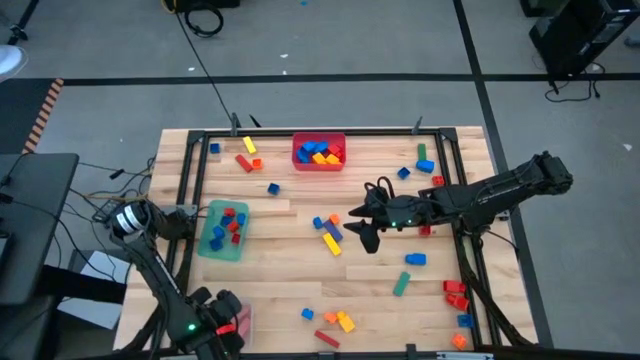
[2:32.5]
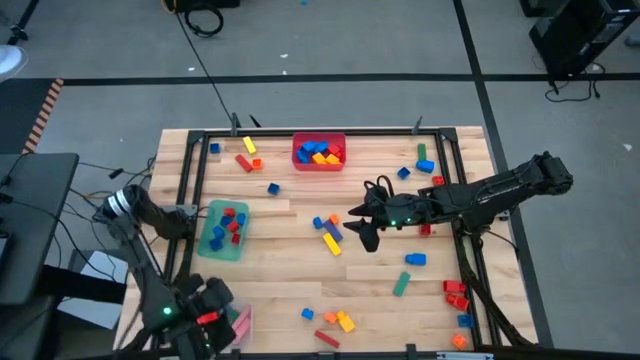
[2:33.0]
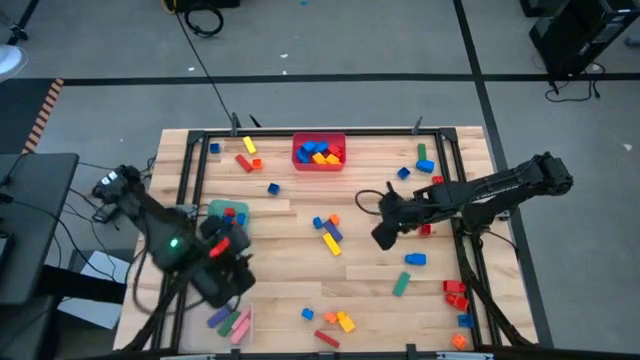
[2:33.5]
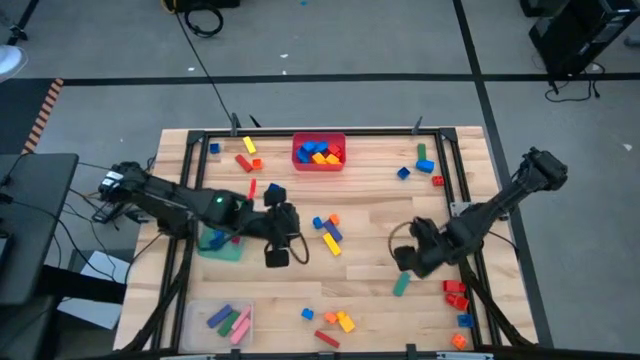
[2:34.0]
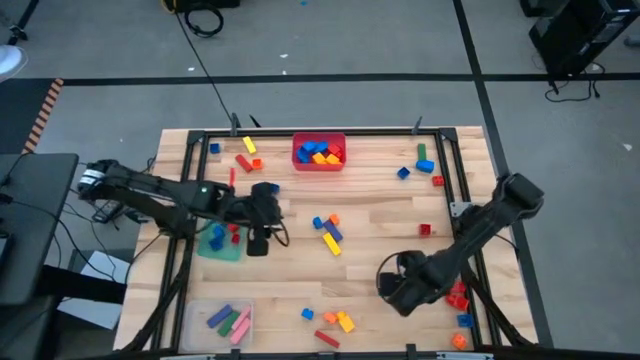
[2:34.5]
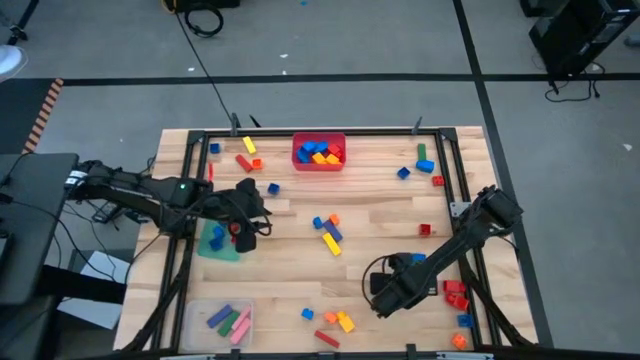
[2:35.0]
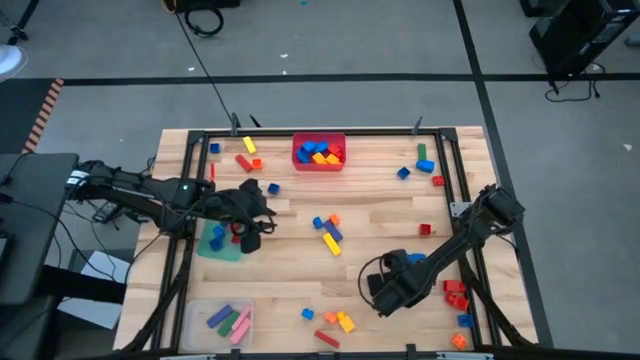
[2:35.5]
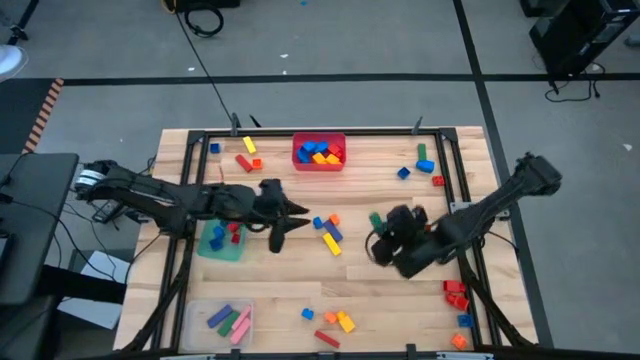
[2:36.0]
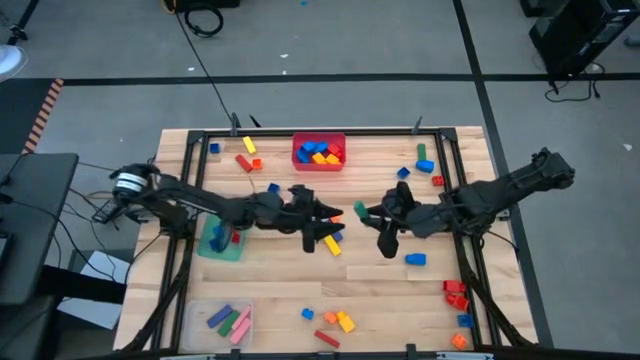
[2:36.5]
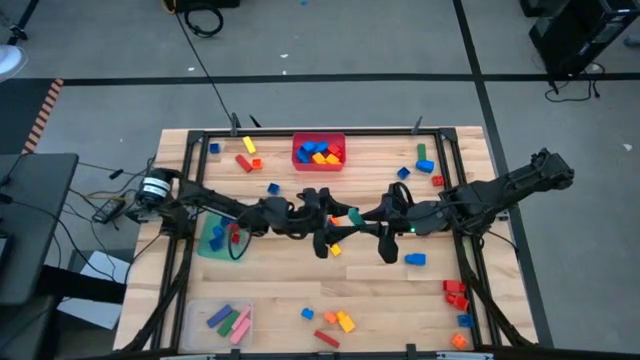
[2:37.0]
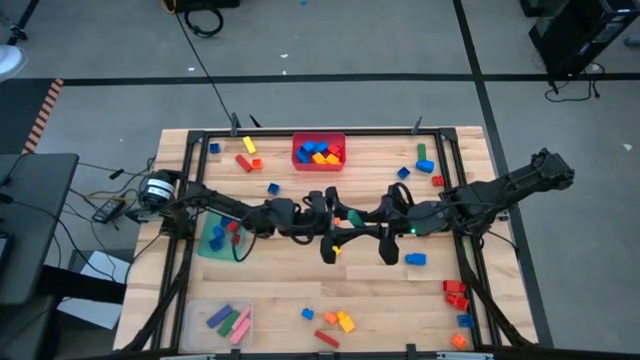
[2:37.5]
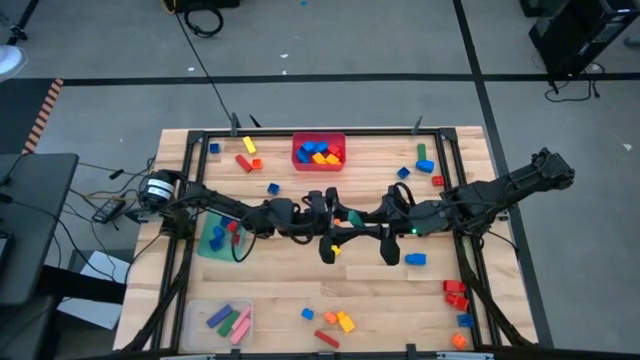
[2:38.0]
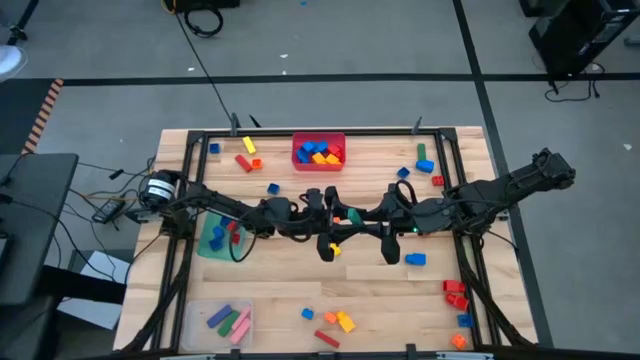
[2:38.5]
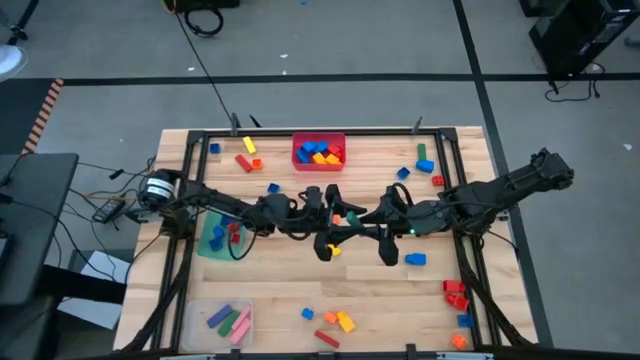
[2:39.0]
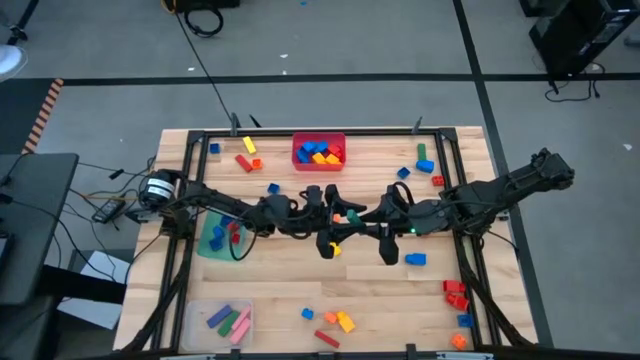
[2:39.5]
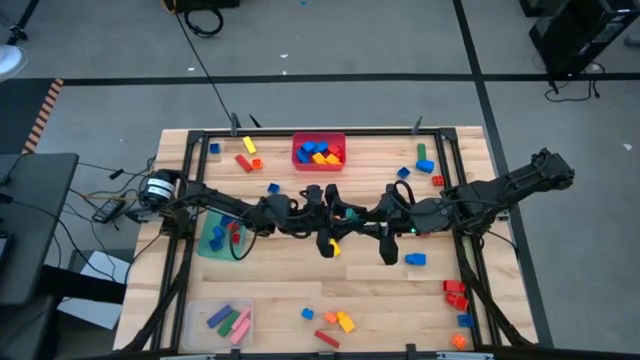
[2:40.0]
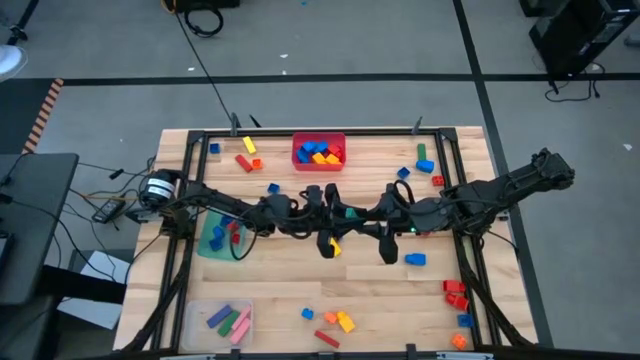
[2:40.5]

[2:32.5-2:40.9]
Task: Sort blocks by size
Put the teal rectangle block into the transparent bin

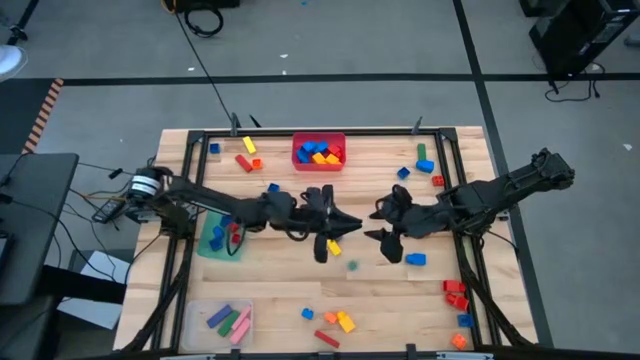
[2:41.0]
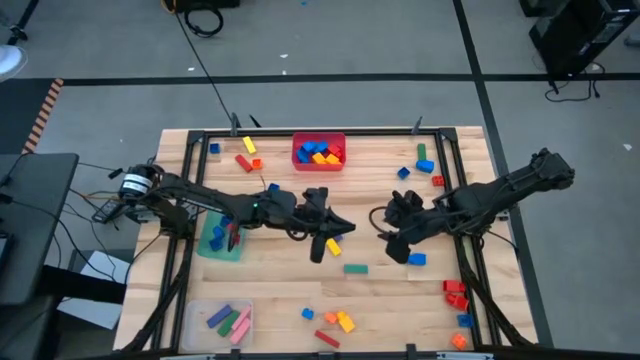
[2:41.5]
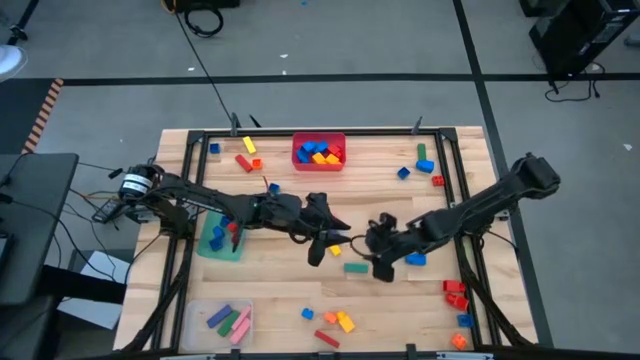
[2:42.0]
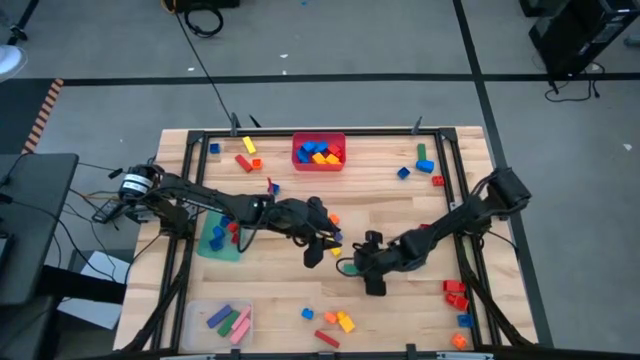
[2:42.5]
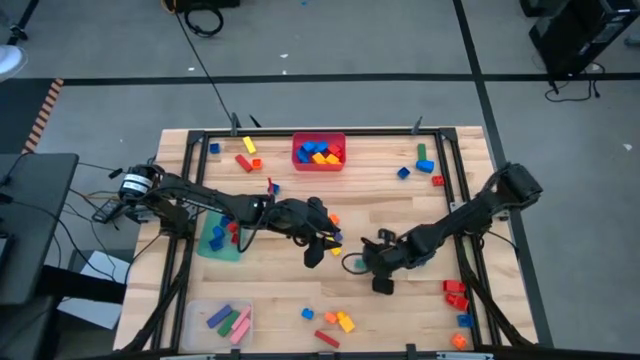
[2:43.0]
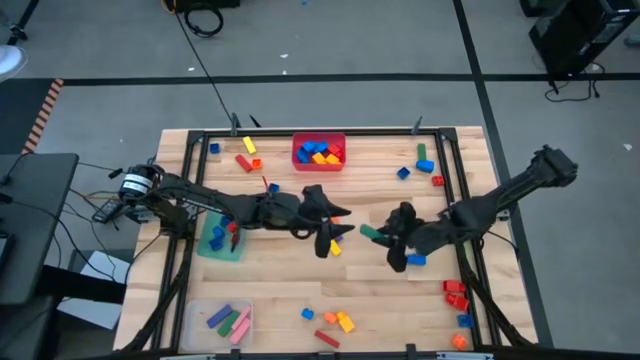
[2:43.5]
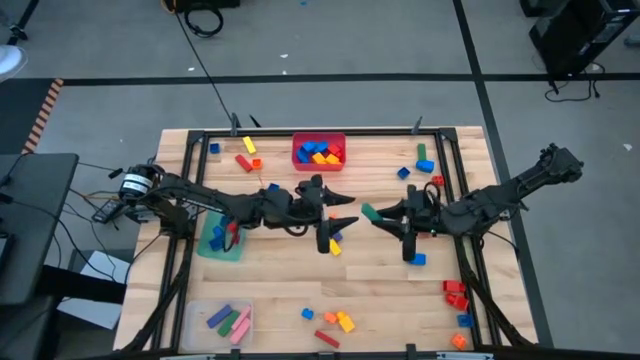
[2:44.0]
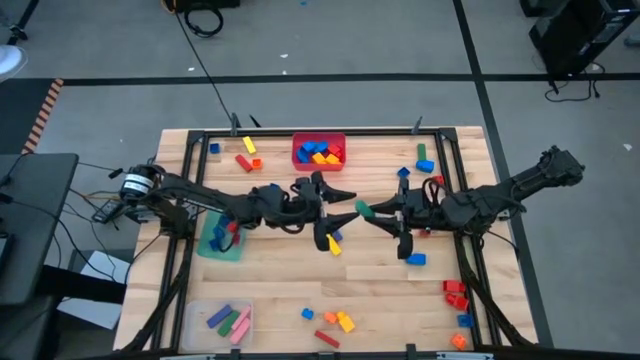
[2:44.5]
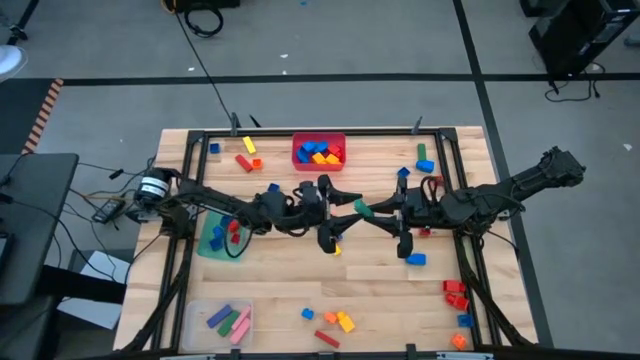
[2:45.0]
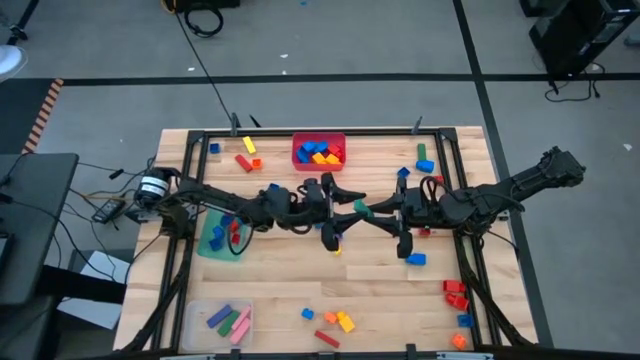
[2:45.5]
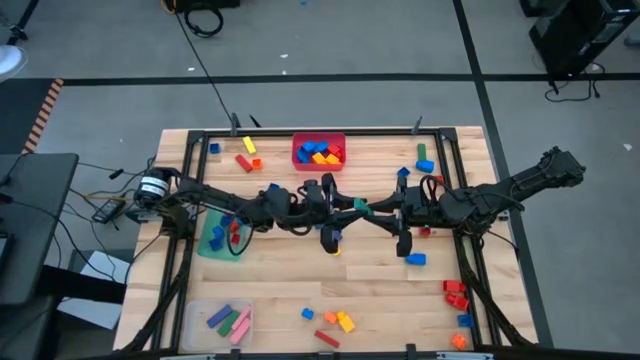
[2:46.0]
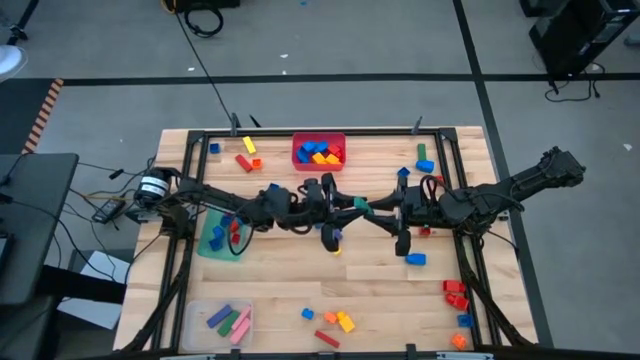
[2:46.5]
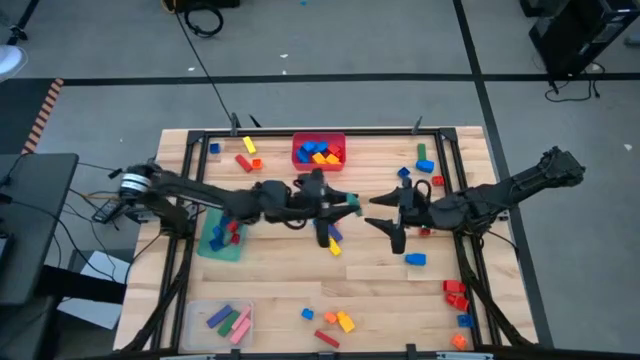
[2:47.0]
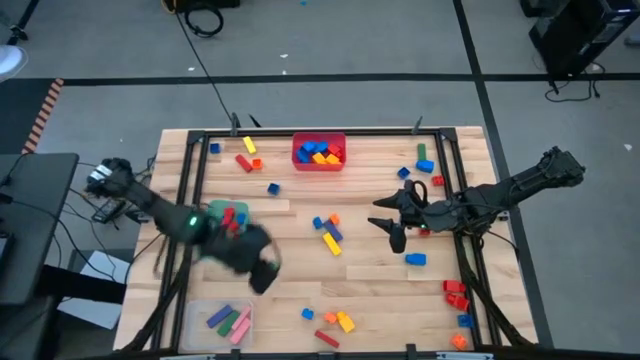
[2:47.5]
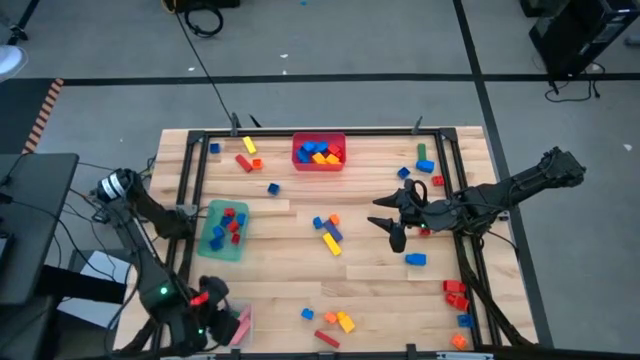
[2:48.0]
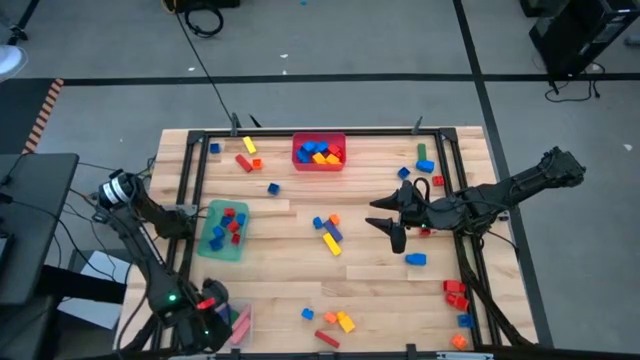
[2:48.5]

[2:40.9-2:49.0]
Put the teal rectangle block into the transparent bin

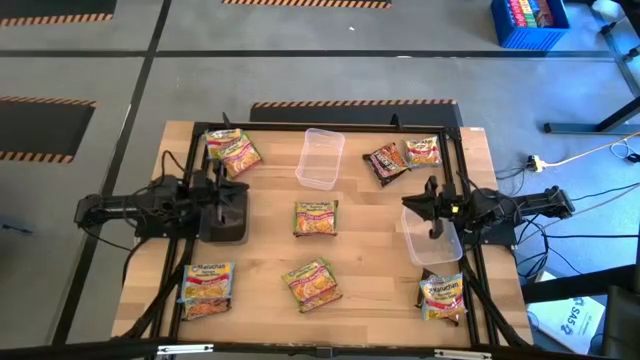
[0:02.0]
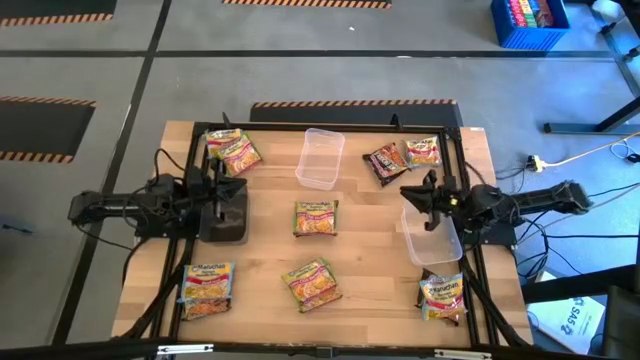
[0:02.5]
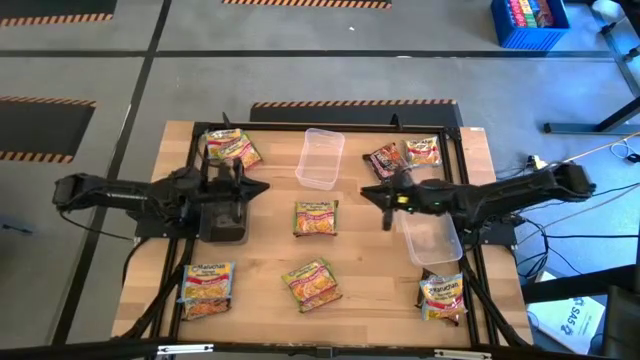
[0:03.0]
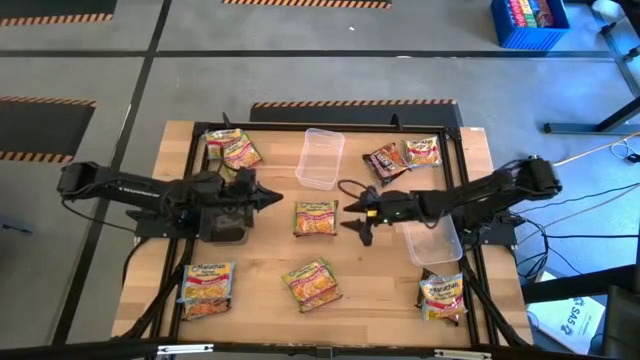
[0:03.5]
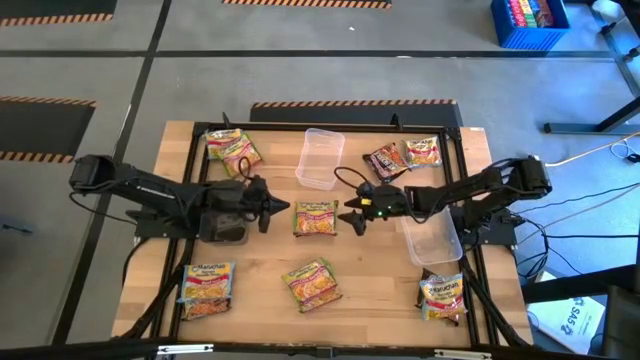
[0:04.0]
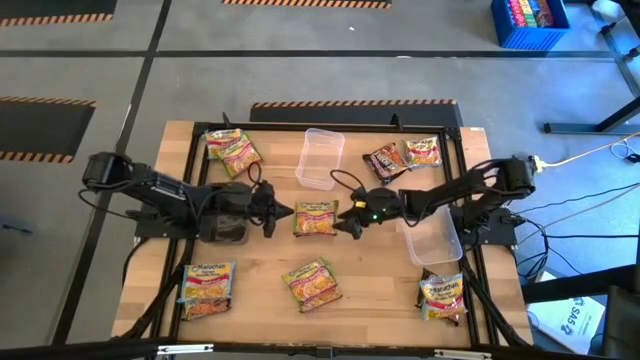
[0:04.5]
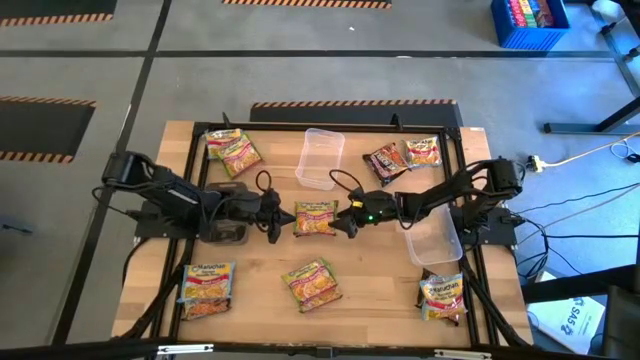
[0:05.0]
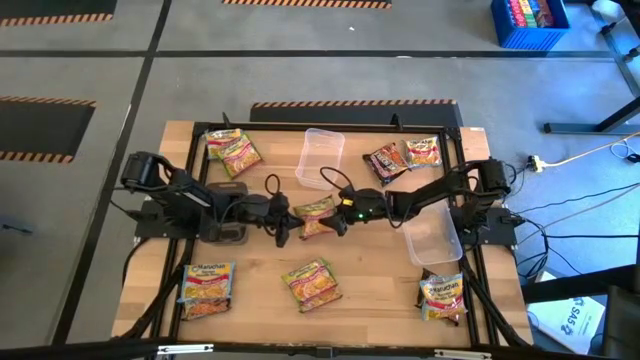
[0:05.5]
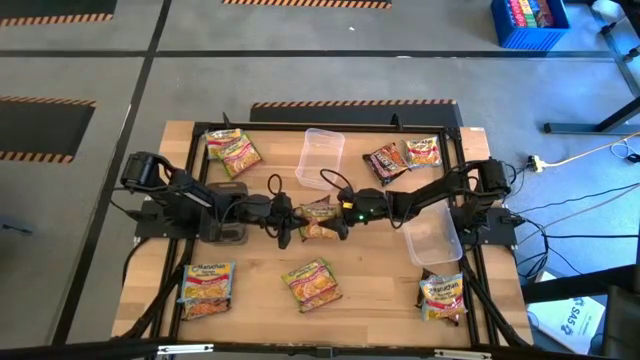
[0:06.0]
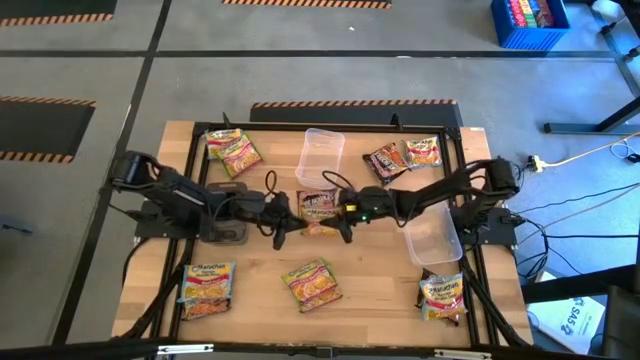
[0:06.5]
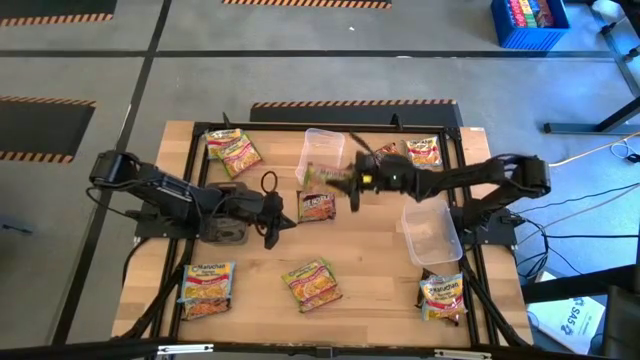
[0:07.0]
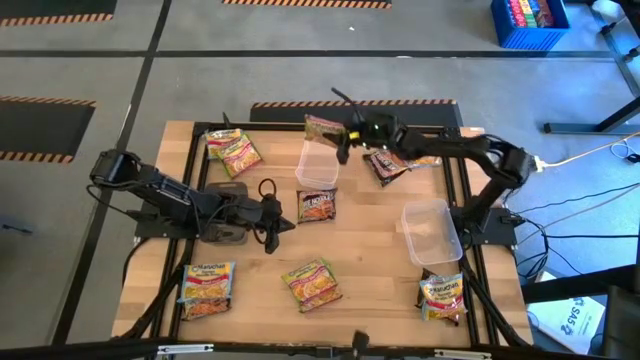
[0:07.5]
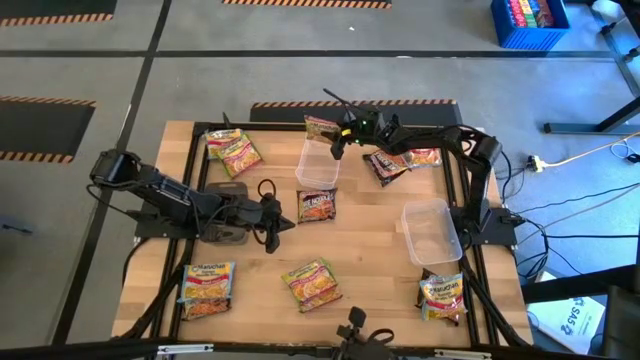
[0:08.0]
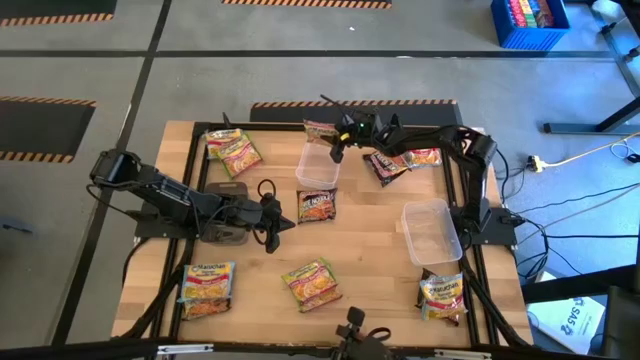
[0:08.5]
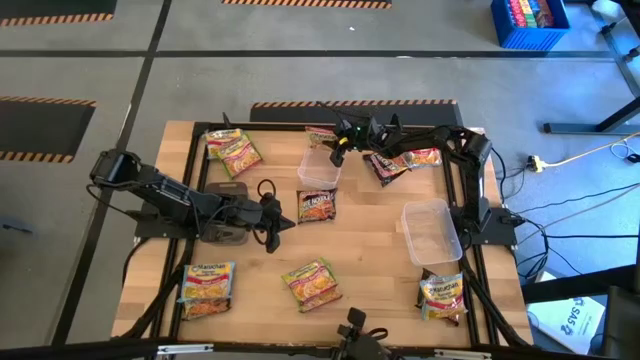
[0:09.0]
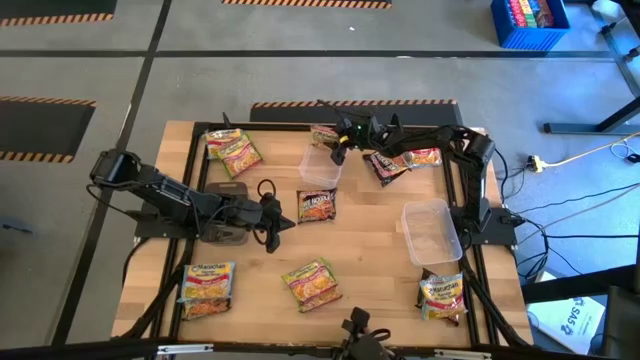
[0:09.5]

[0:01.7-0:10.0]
Task: Sort Maruchan noodles
Put the middle green noodle pack into the top transparent bin
